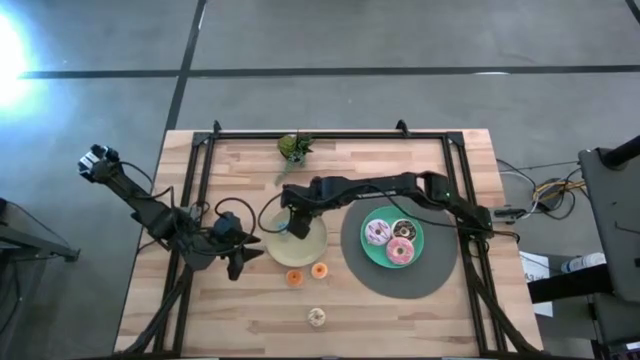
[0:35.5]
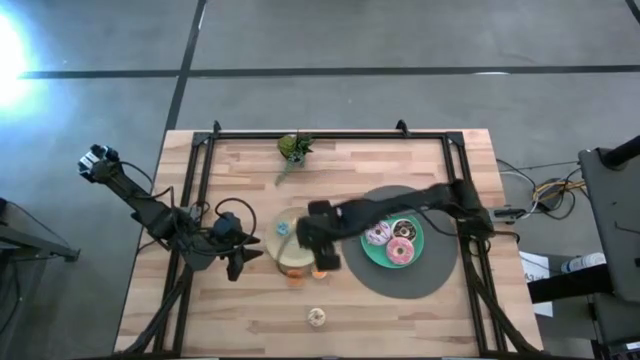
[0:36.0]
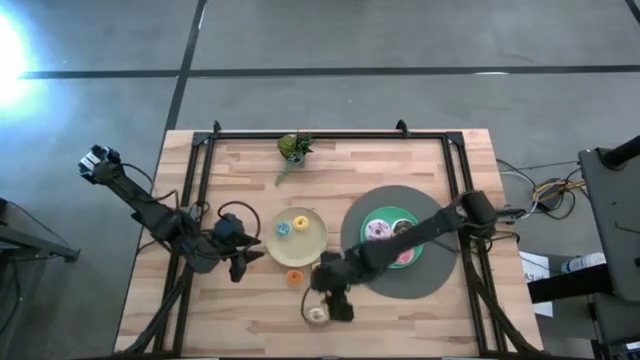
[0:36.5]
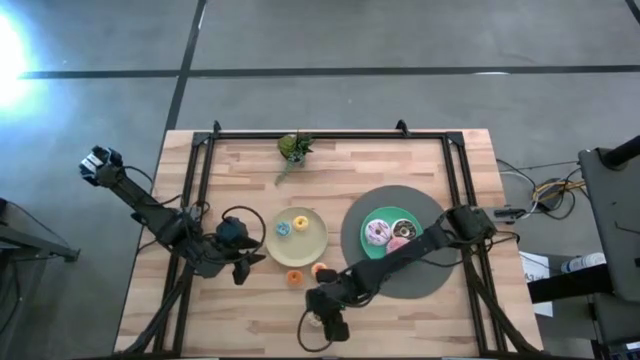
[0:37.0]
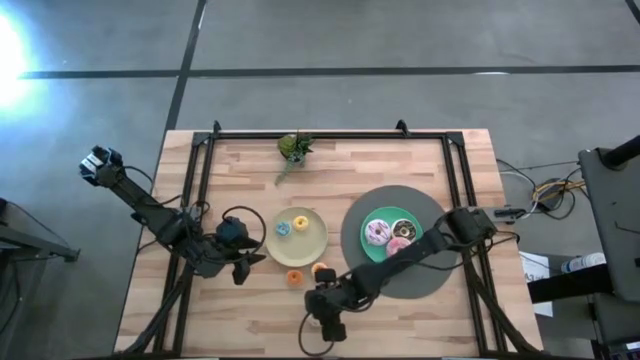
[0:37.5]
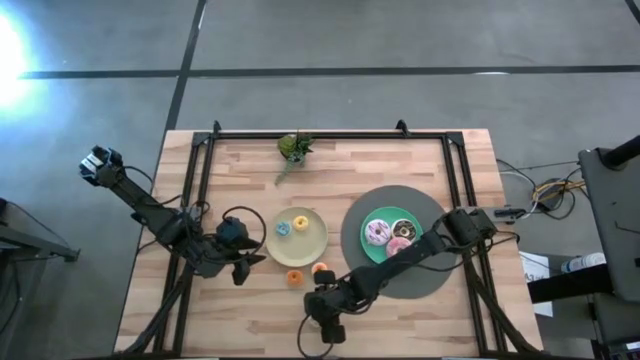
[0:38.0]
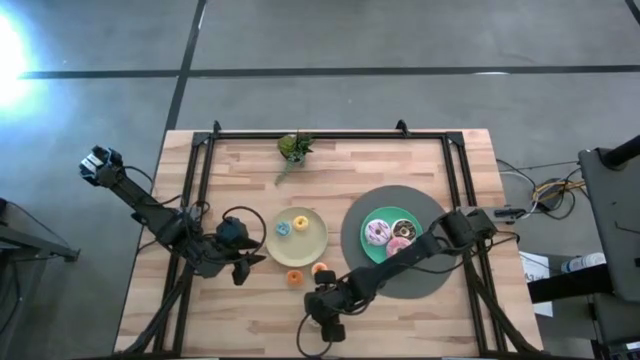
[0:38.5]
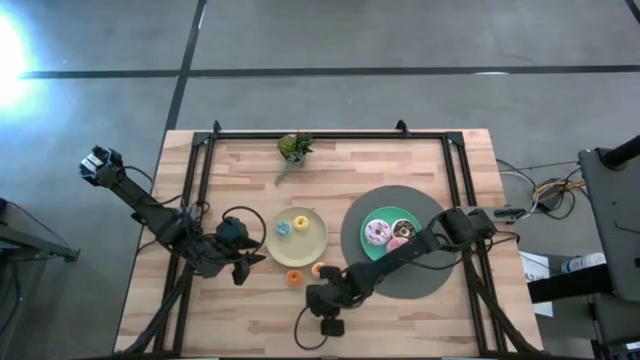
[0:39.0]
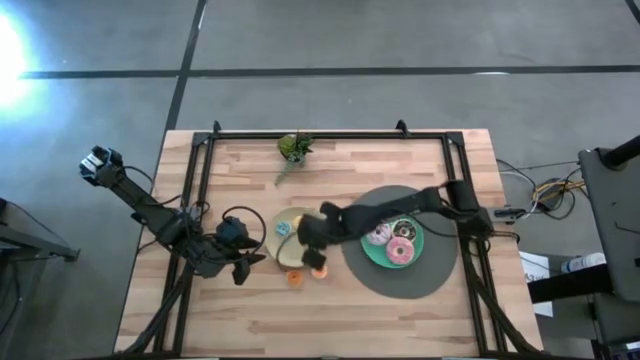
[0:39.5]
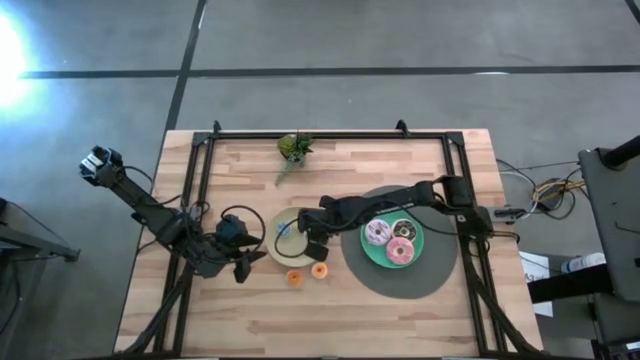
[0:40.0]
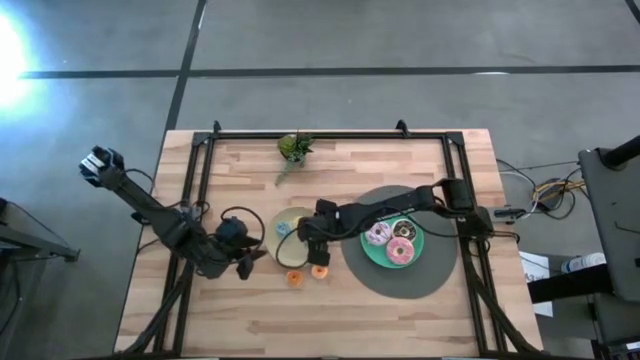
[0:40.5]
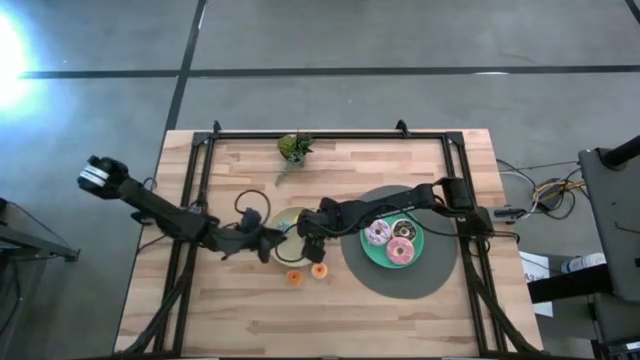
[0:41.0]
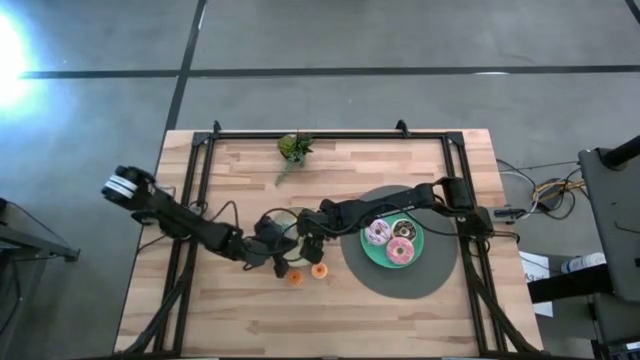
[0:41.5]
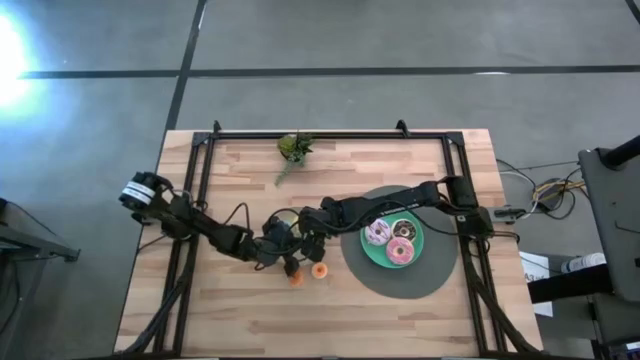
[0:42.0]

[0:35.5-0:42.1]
Task: Pick & Place donuts
Put the small white donut on the white plate

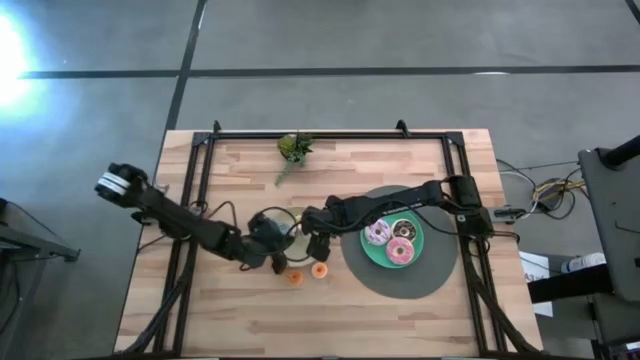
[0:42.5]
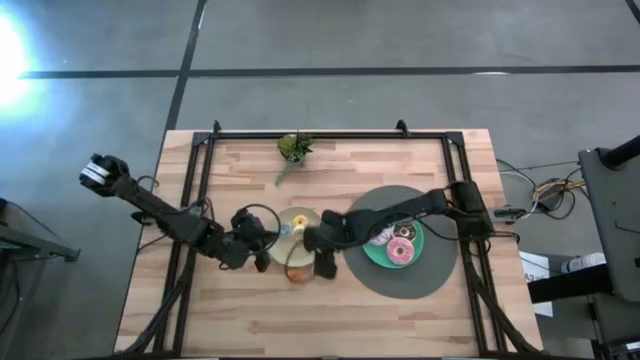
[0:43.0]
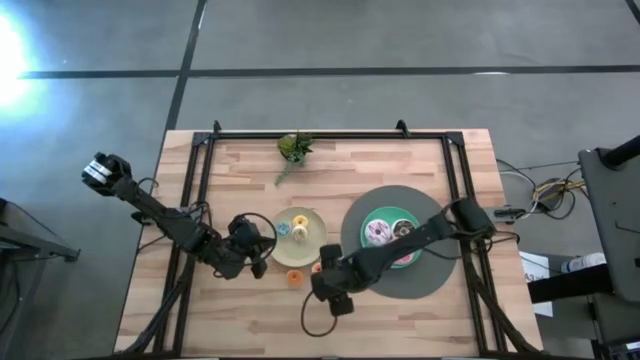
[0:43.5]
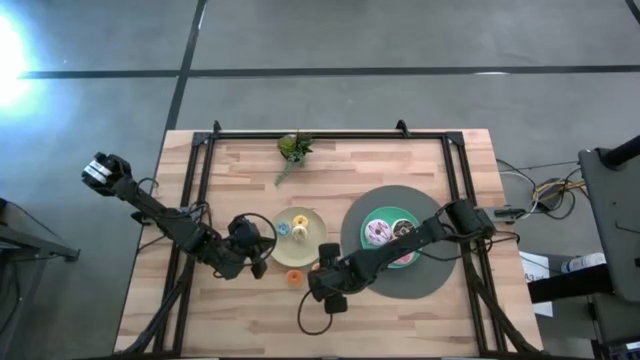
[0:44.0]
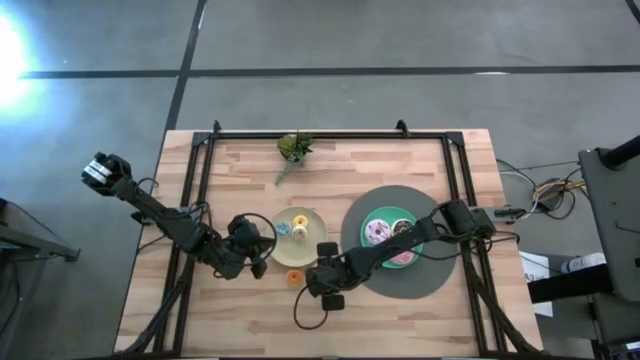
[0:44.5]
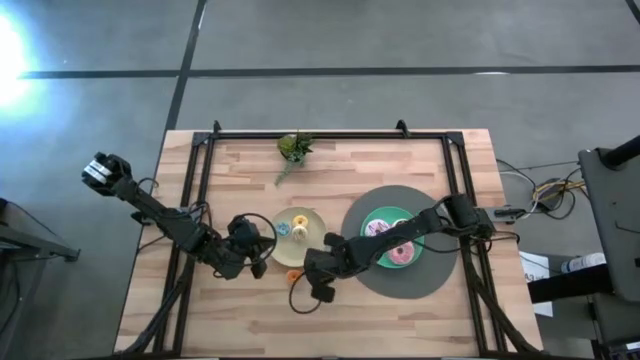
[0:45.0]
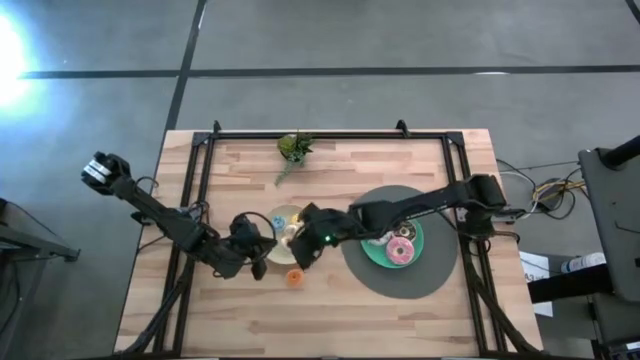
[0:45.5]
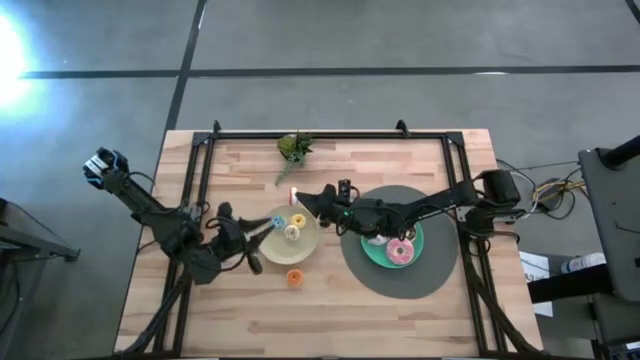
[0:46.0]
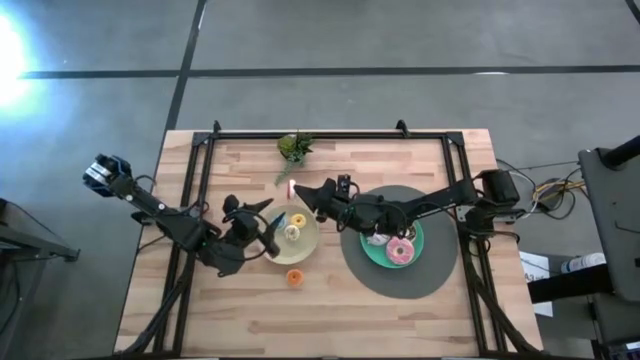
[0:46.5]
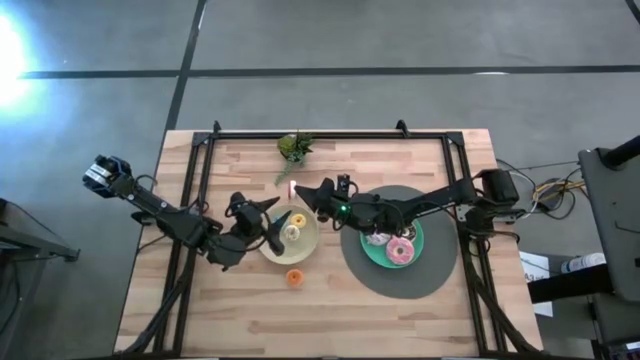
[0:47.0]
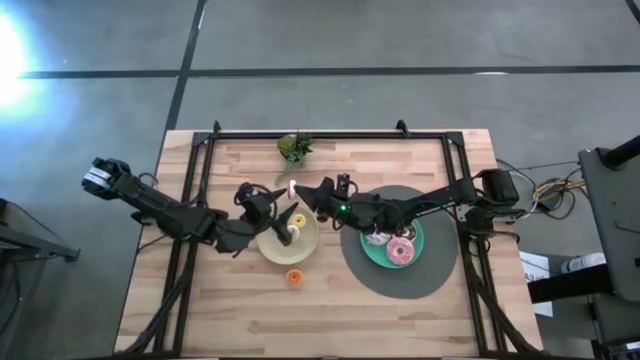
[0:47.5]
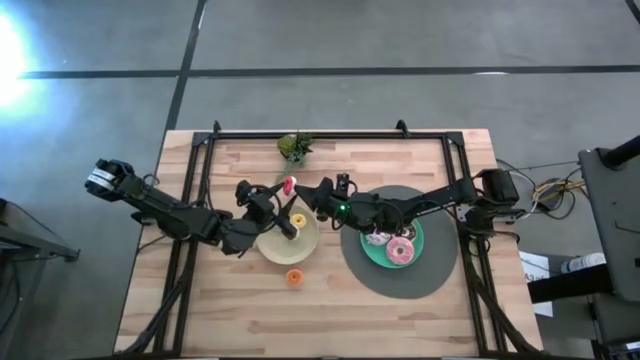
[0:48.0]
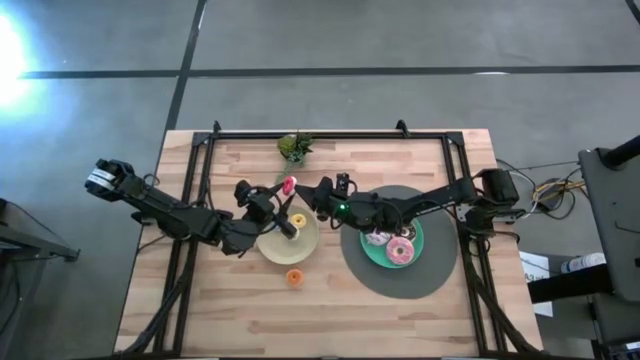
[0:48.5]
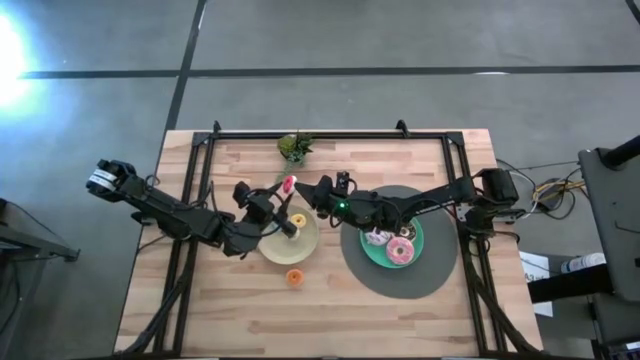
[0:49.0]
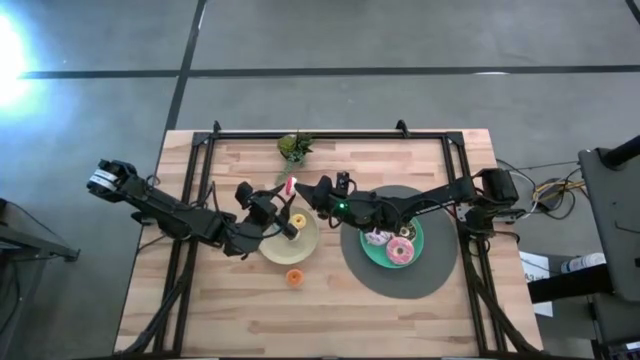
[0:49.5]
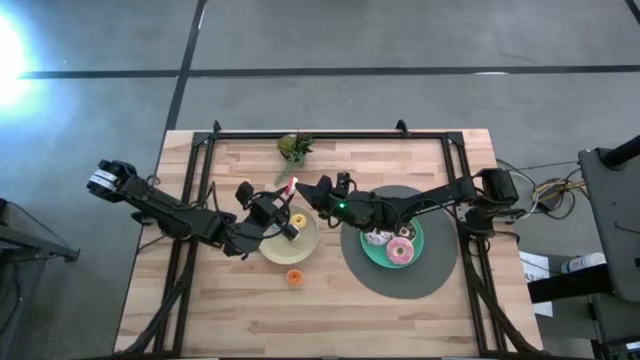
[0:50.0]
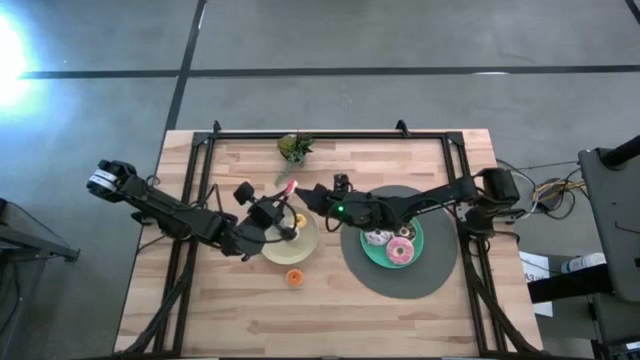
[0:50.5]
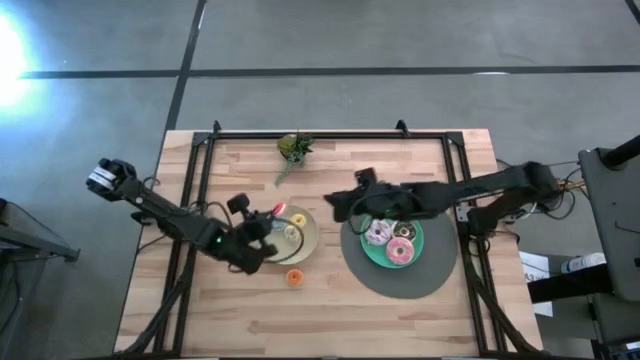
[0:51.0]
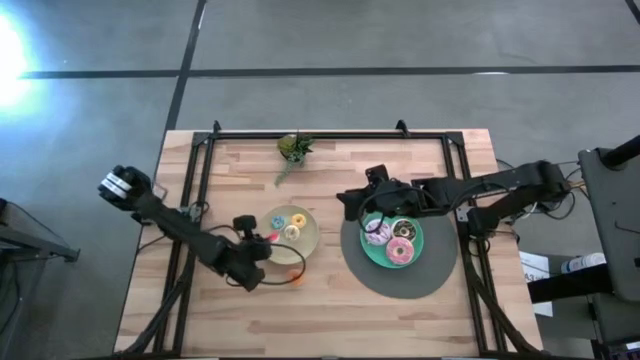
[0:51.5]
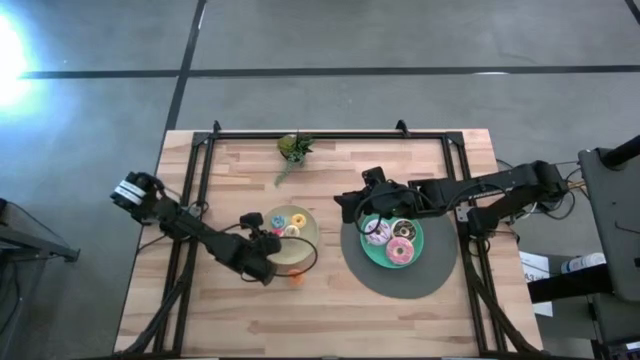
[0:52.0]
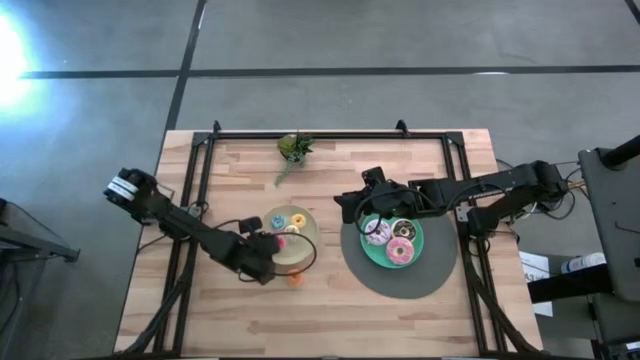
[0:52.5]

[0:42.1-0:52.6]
Put the small red donut on the white plate

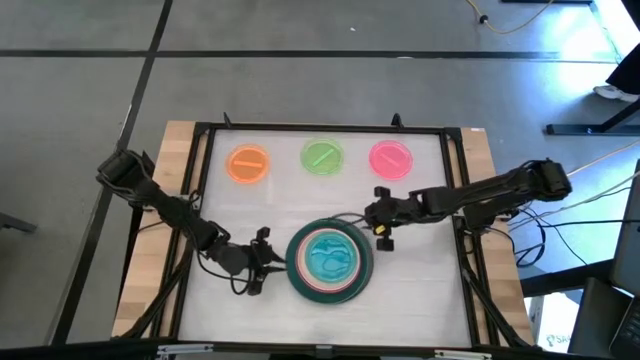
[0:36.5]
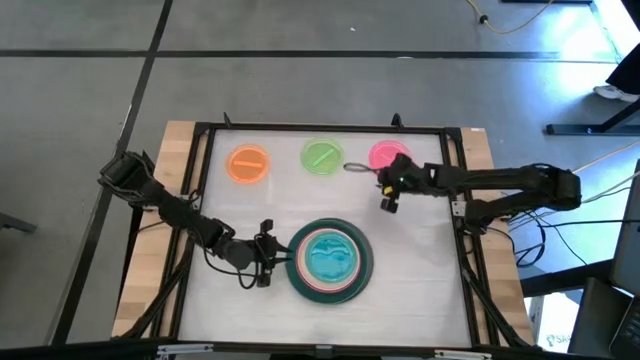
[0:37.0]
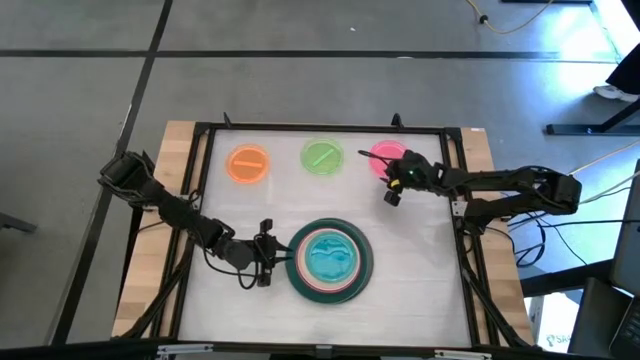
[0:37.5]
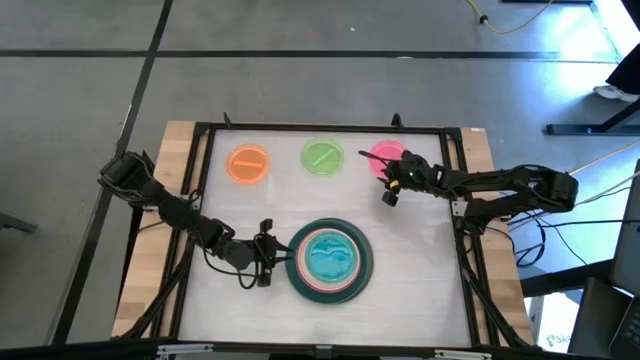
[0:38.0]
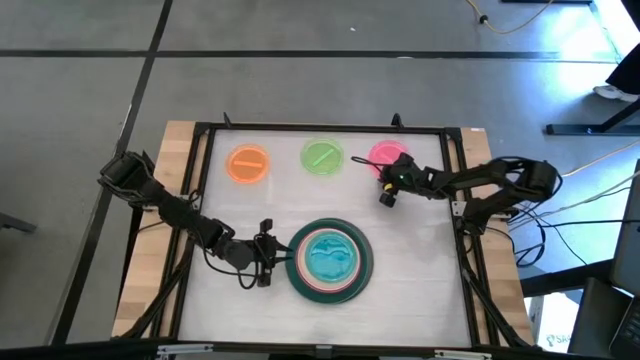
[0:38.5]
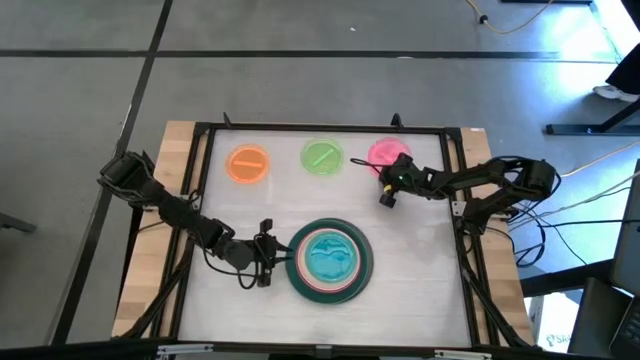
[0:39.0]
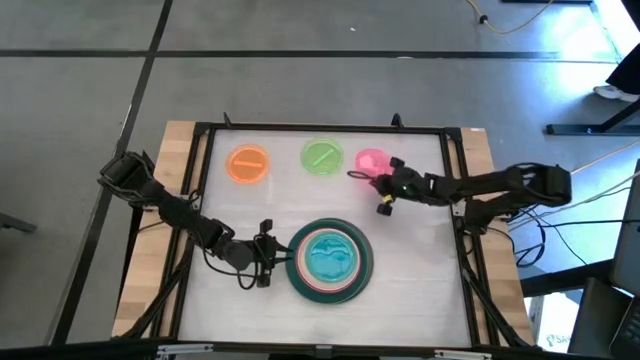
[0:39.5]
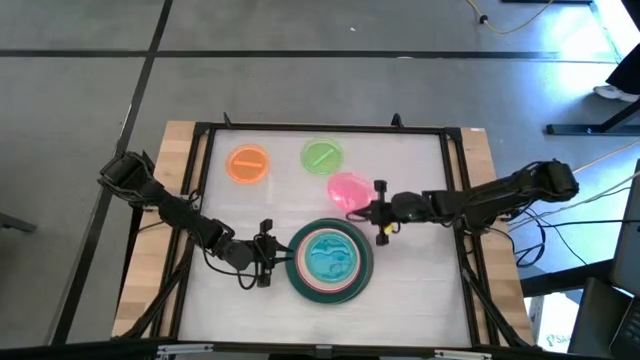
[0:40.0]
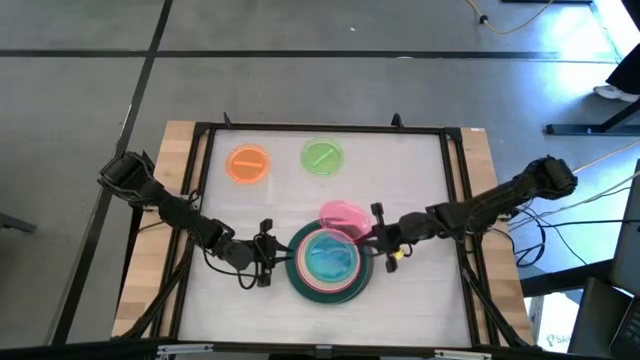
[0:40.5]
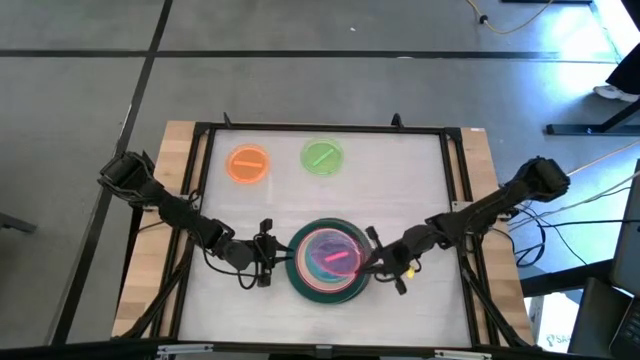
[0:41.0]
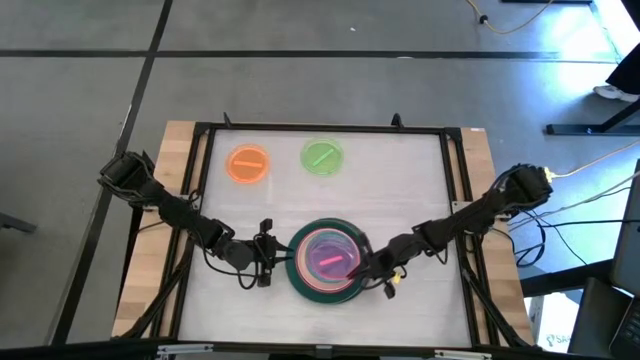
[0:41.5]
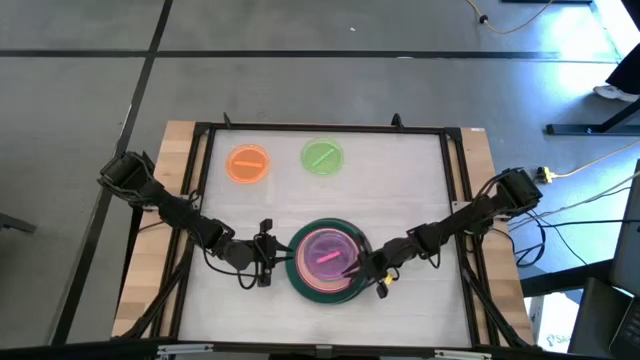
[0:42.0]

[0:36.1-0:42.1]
Task: Stack plastic plates
Stack the light pink plate on top of the blue plate
